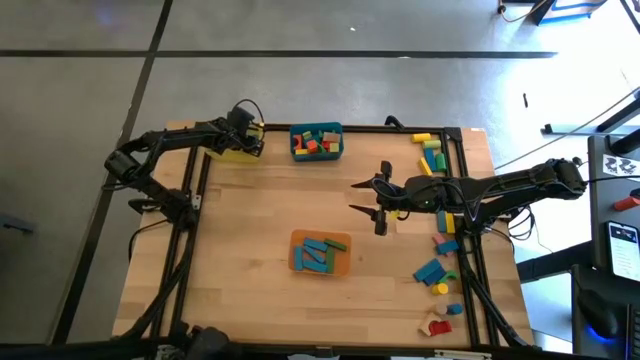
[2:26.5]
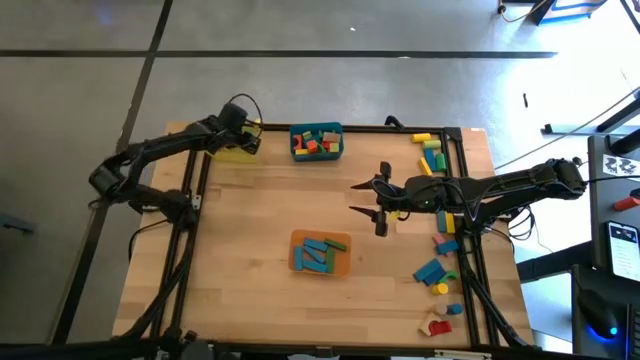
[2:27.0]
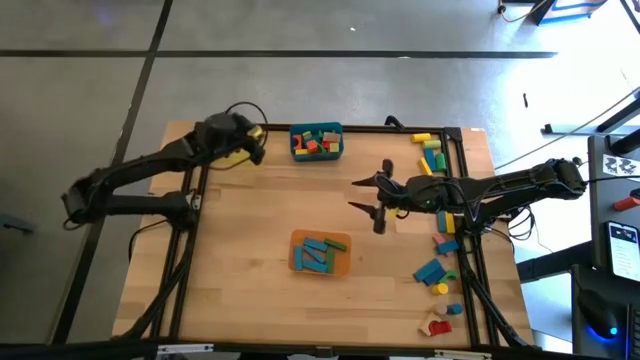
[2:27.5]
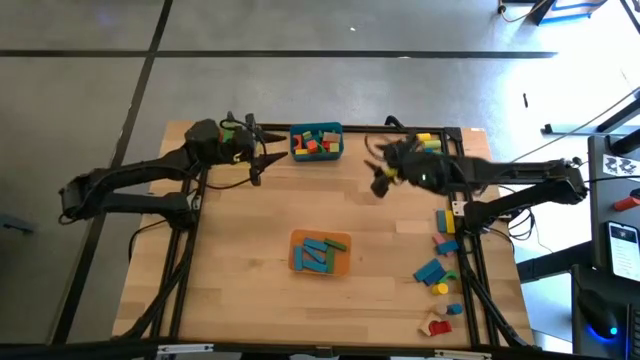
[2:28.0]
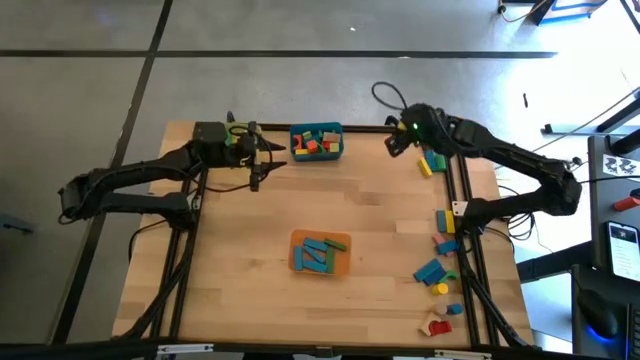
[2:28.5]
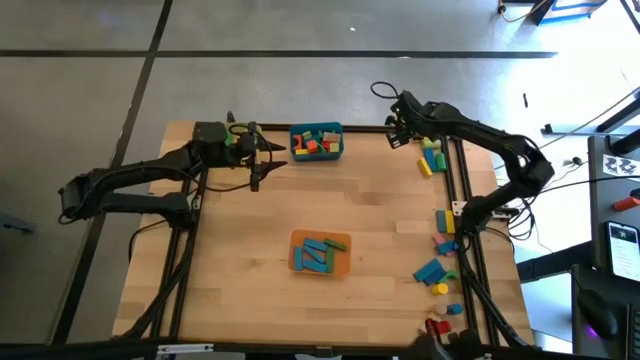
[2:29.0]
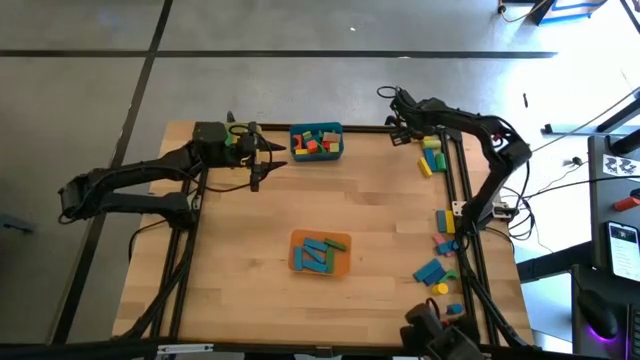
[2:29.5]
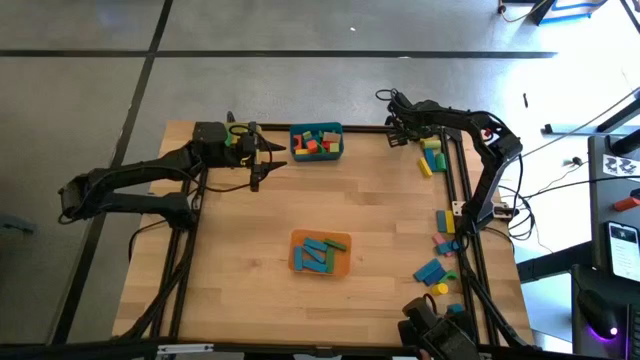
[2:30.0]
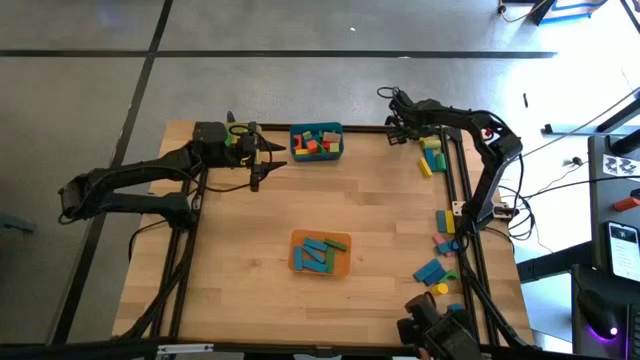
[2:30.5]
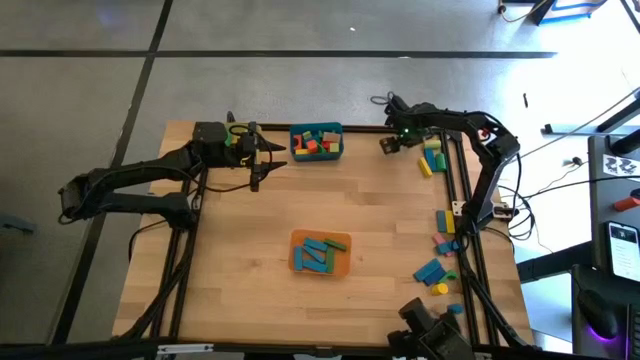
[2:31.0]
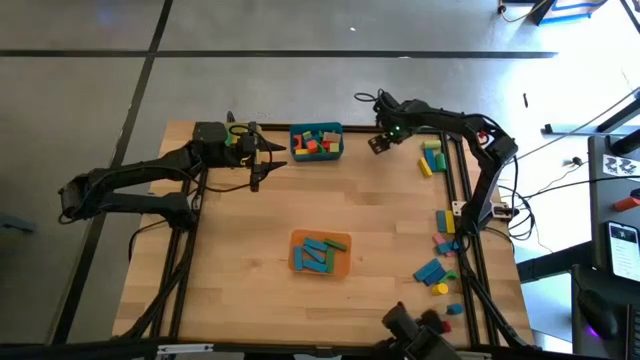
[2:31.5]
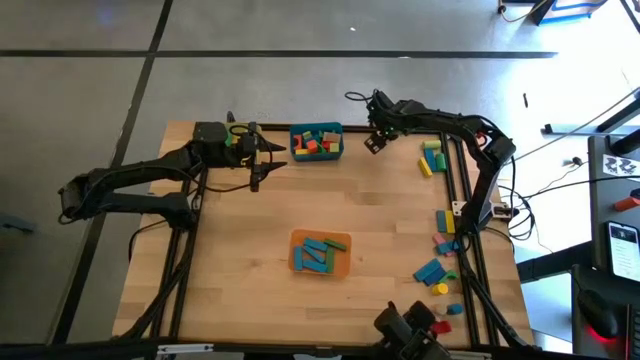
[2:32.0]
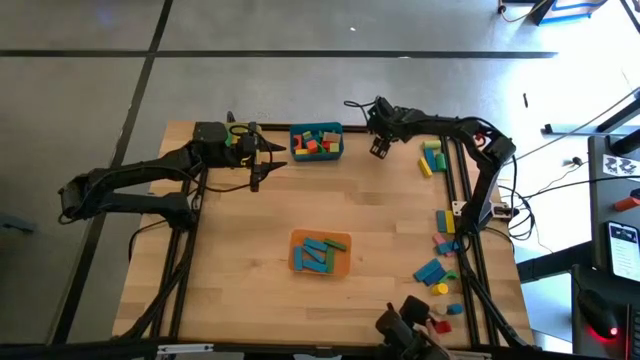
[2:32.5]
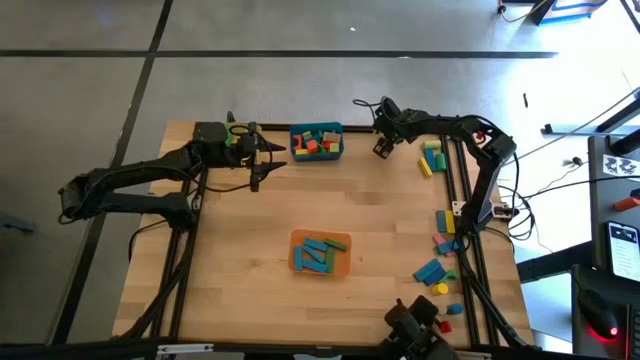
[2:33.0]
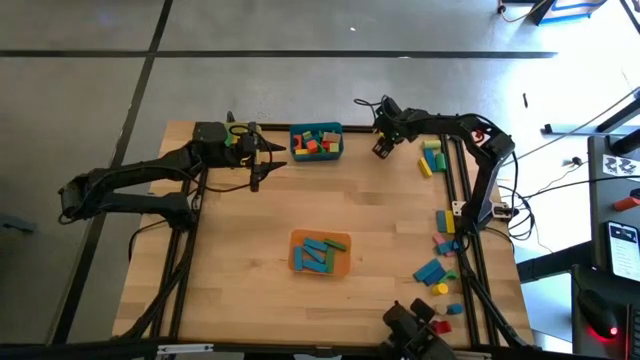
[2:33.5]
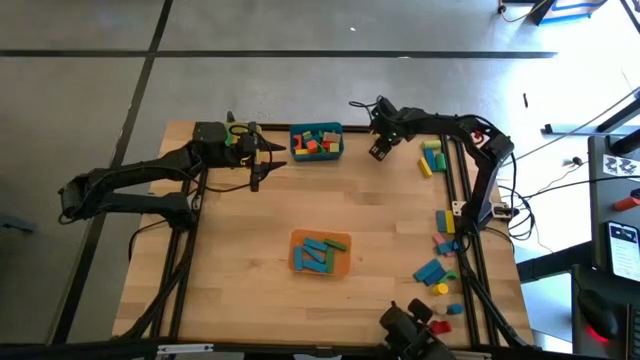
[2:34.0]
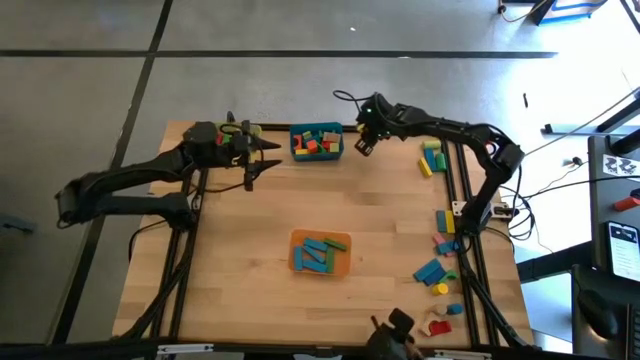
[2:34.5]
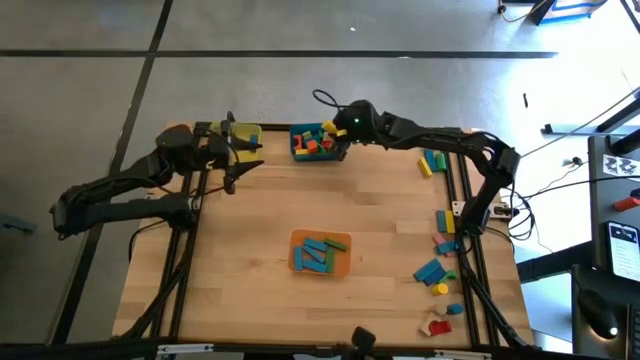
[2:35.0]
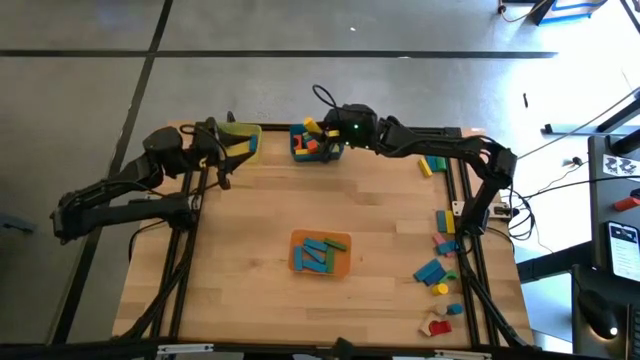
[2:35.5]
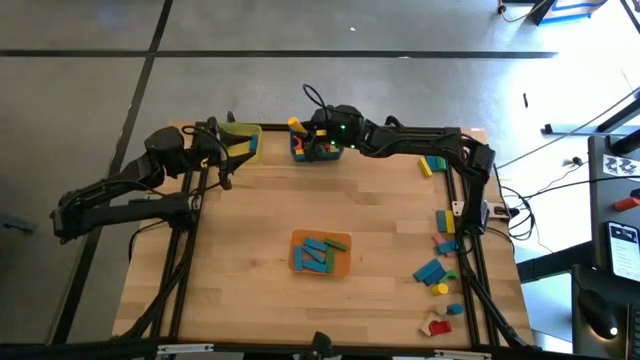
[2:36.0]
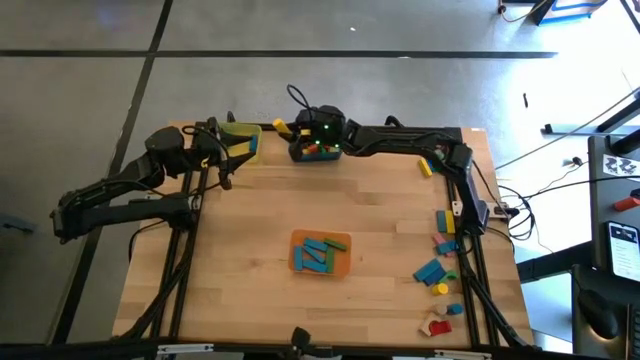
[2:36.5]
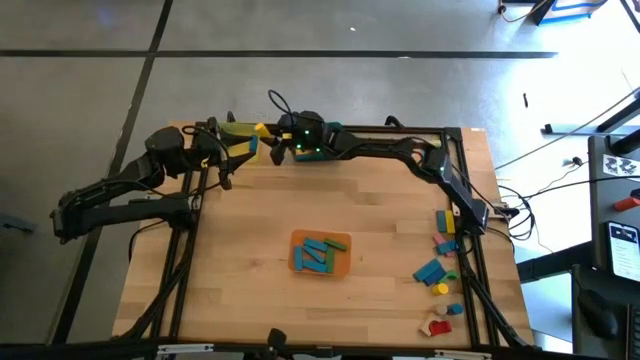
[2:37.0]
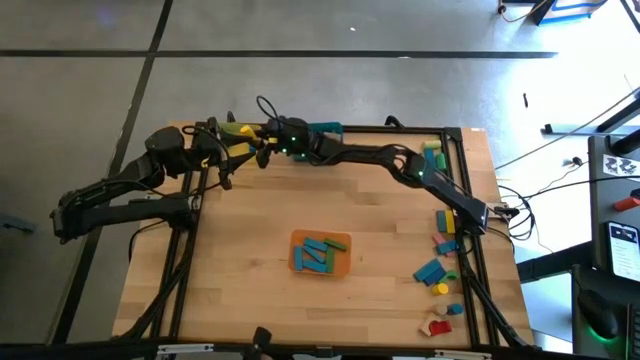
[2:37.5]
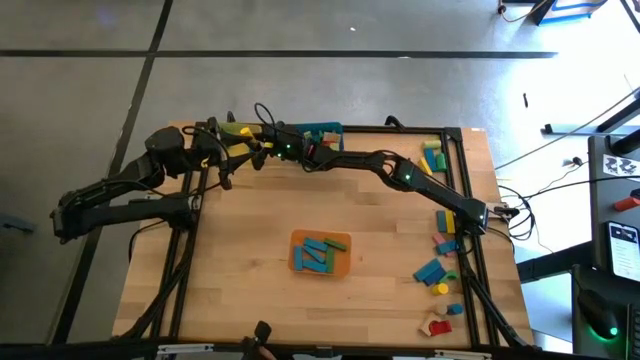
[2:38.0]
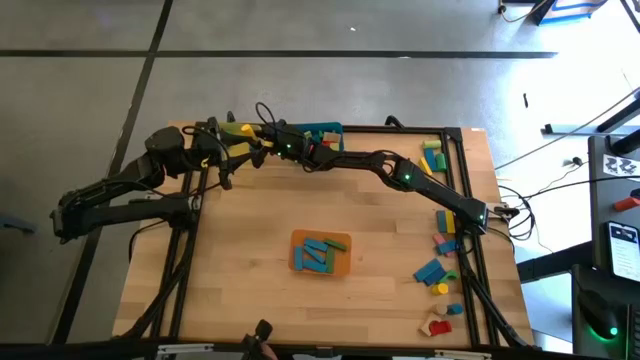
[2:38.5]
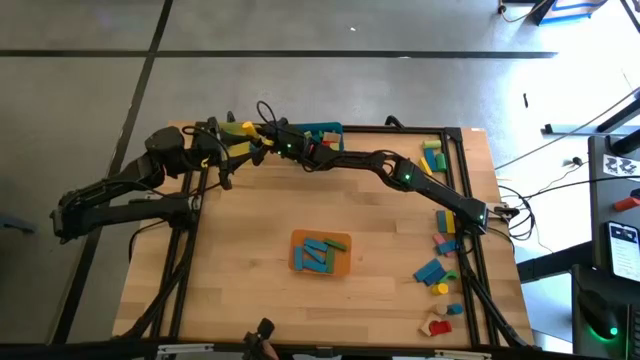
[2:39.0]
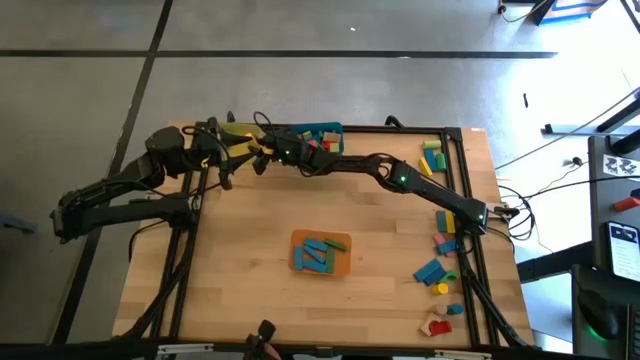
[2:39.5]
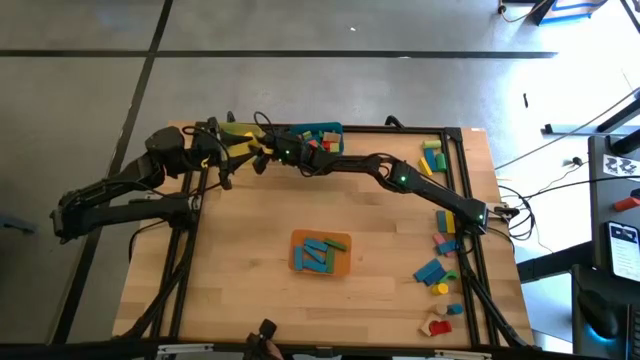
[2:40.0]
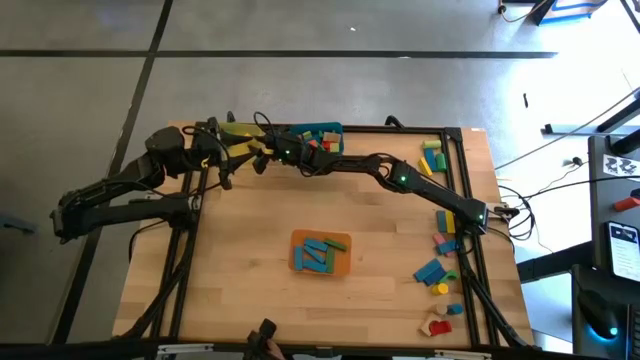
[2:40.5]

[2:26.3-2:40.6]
Task: Sort blocks by size
Put the yellow cylindrical block into the yellow bin

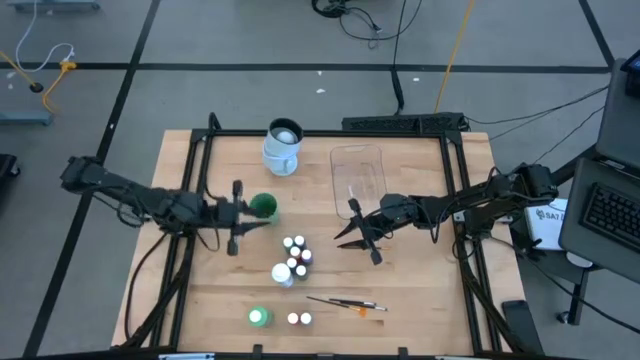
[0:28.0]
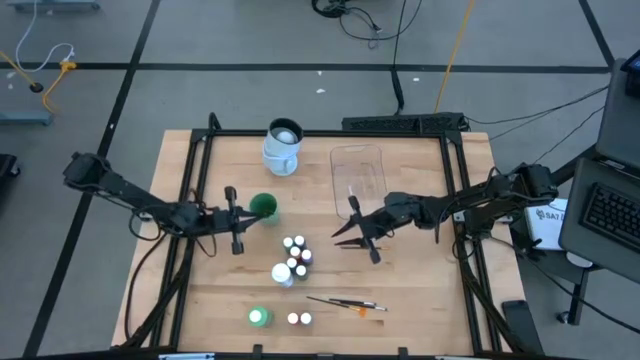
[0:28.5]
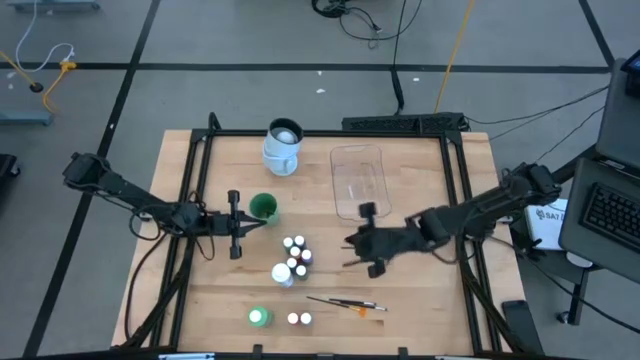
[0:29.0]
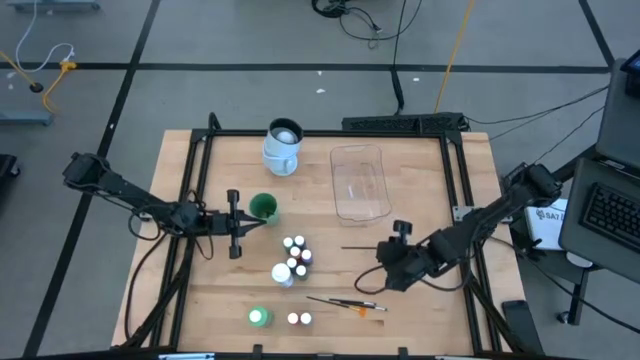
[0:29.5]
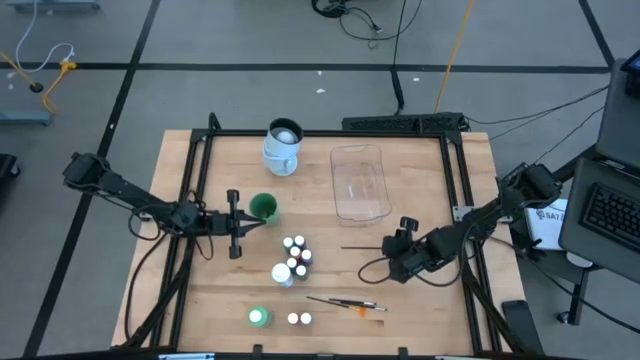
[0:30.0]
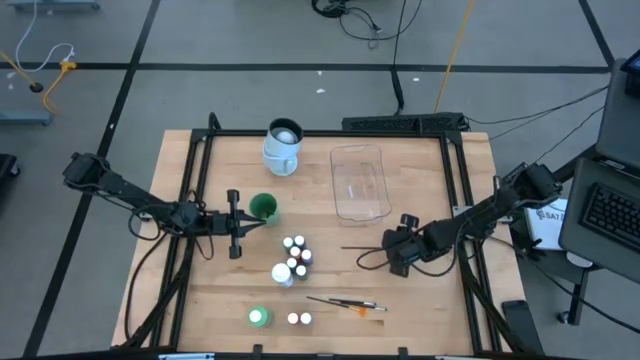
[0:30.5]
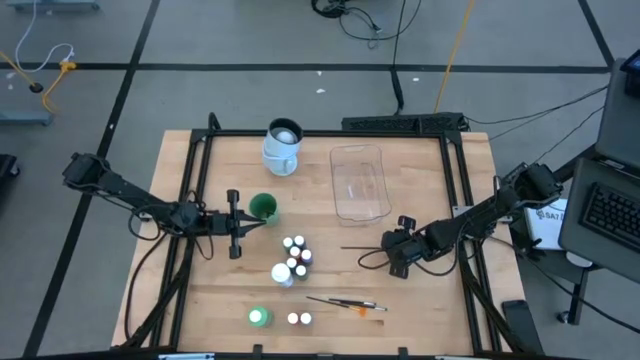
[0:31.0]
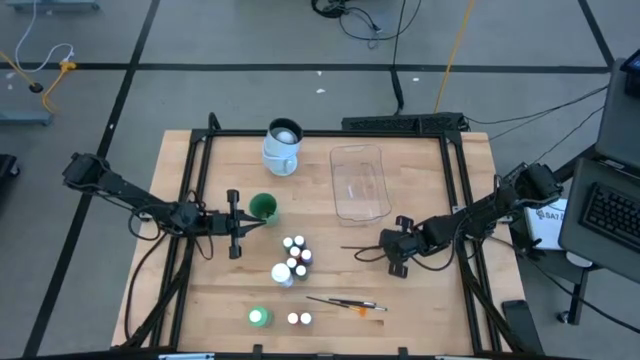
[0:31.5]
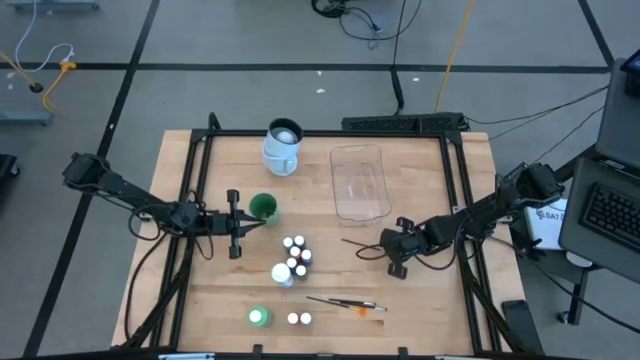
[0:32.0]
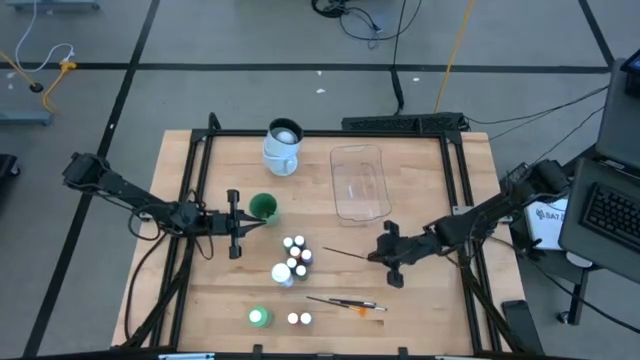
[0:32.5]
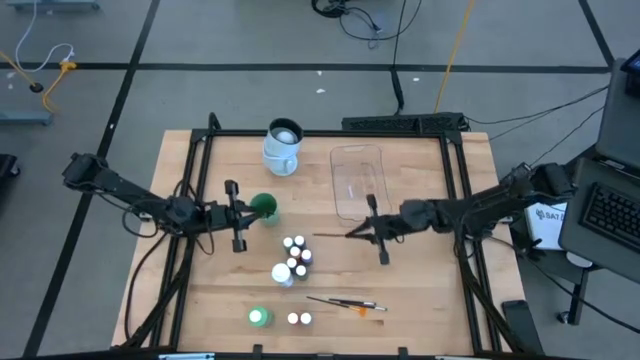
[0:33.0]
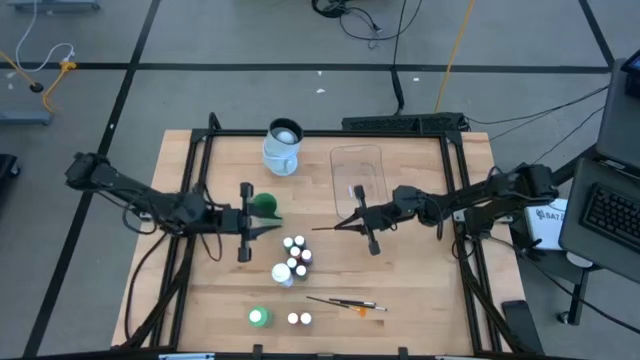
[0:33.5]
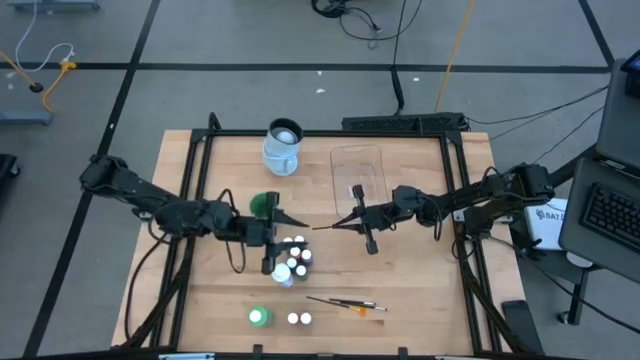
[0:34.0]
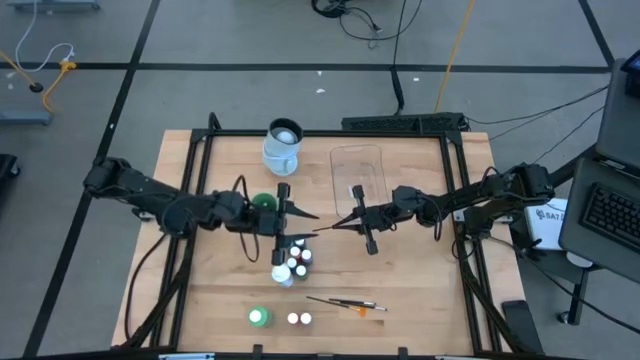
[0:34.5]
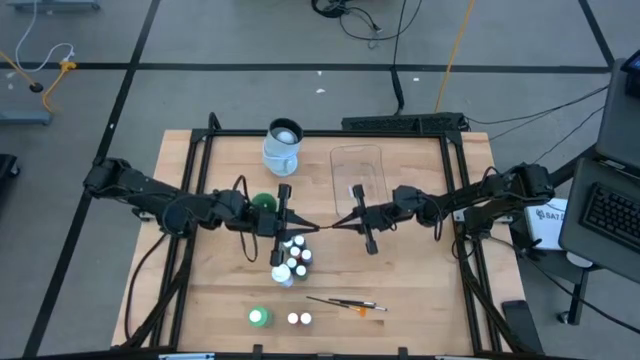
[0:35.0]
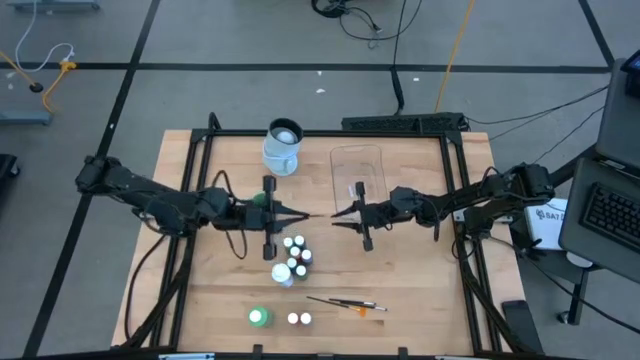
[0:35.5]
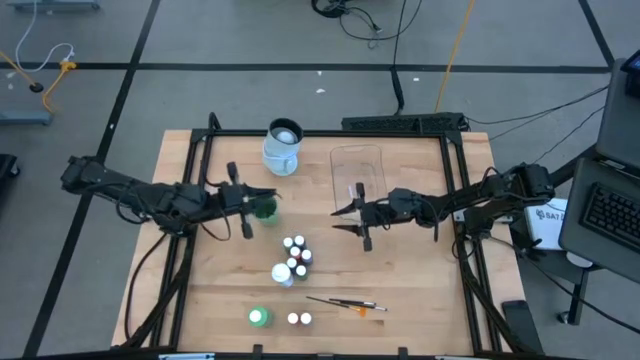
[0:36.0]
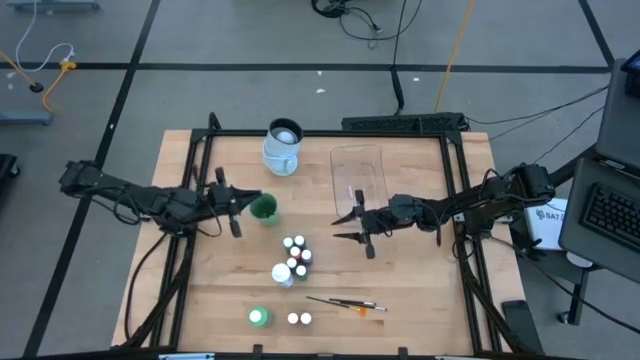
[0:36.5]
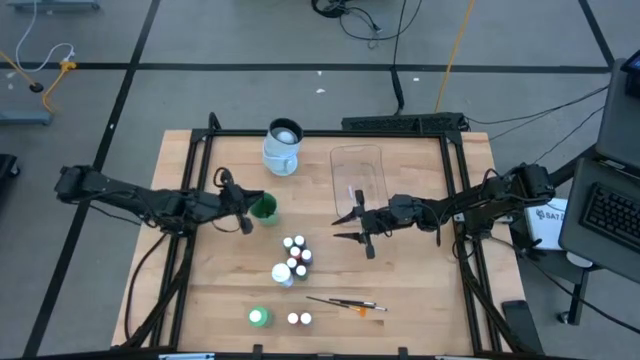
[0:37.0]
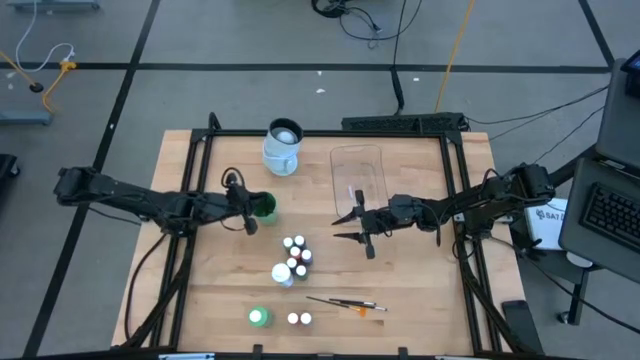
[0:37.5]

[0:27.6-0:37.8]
Task: Pick & Place Paint Supplies
Put the gold paintbrush into the green cup
